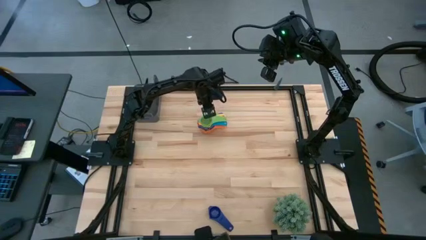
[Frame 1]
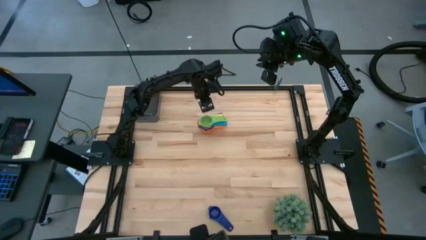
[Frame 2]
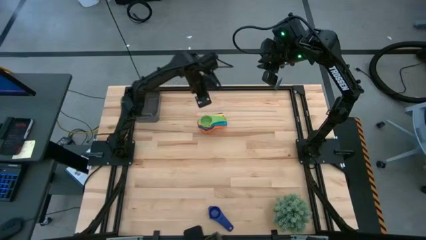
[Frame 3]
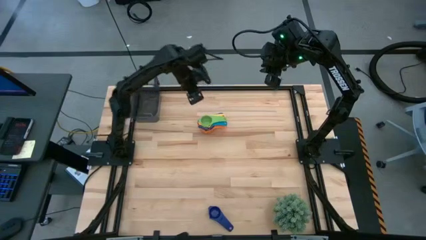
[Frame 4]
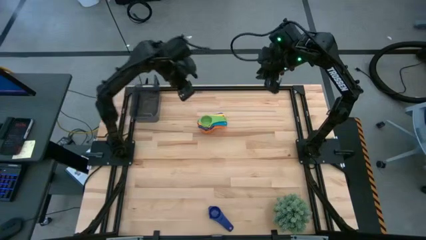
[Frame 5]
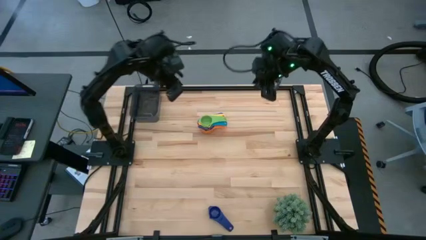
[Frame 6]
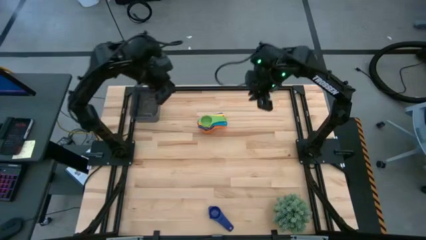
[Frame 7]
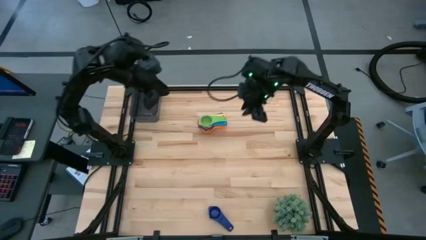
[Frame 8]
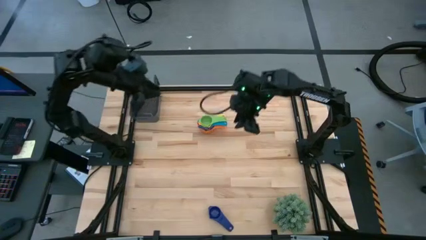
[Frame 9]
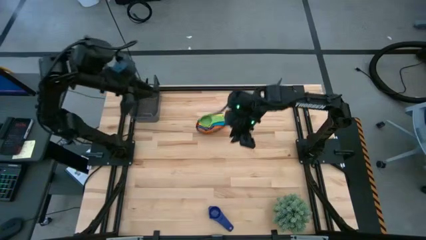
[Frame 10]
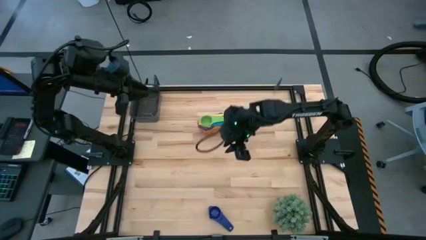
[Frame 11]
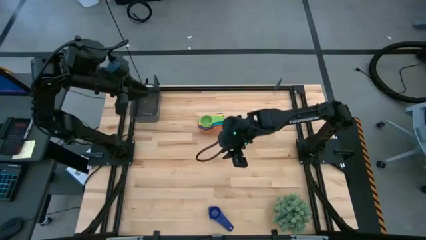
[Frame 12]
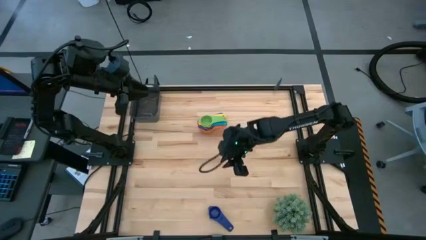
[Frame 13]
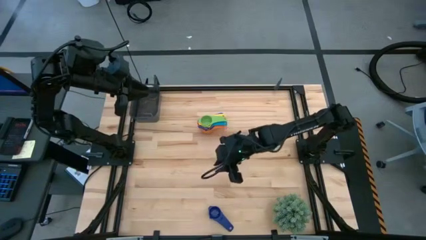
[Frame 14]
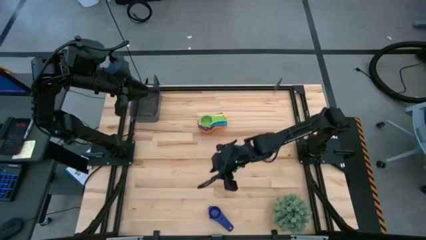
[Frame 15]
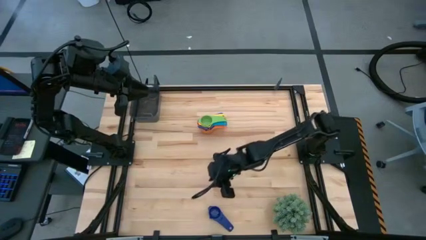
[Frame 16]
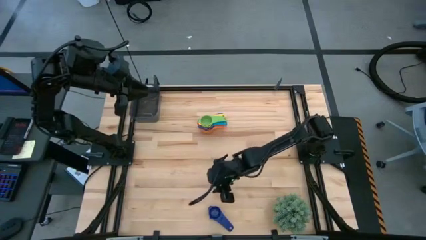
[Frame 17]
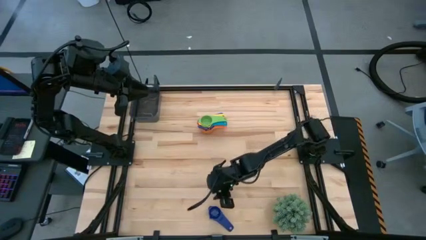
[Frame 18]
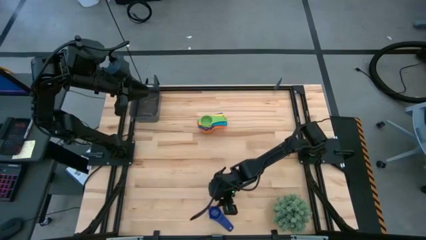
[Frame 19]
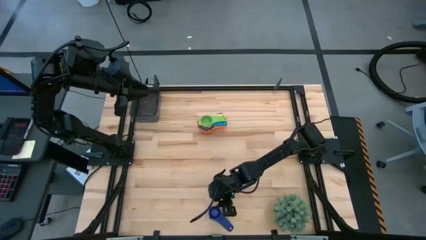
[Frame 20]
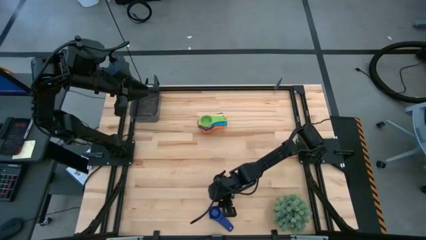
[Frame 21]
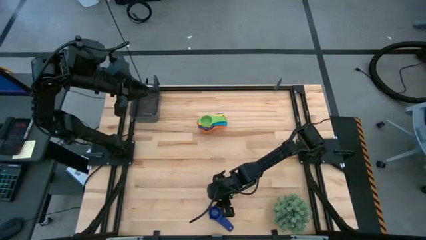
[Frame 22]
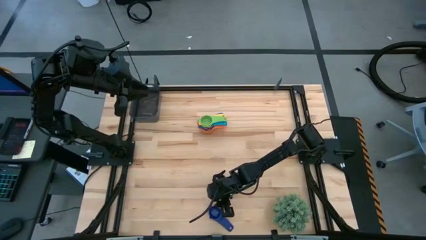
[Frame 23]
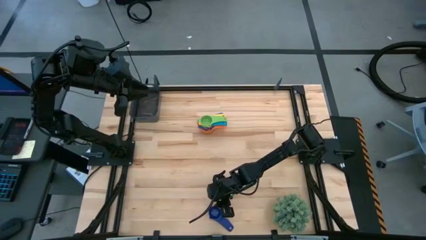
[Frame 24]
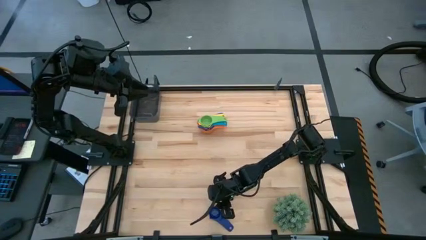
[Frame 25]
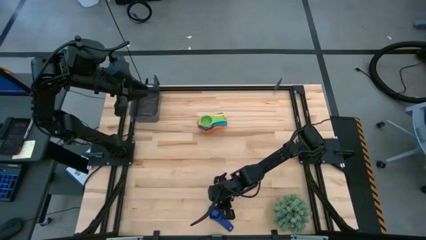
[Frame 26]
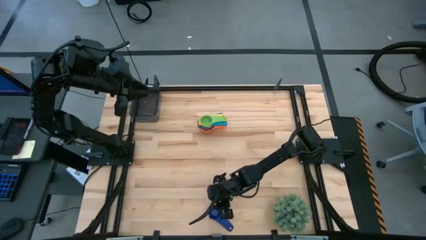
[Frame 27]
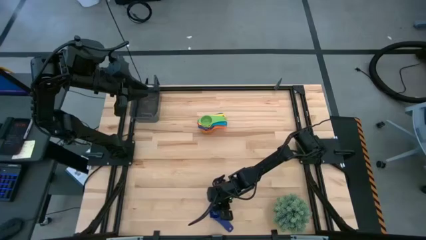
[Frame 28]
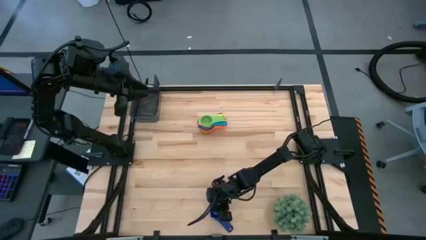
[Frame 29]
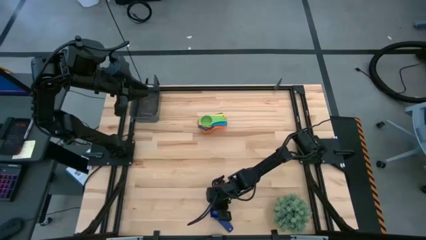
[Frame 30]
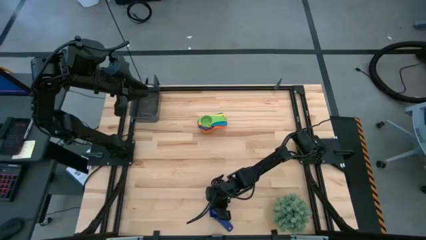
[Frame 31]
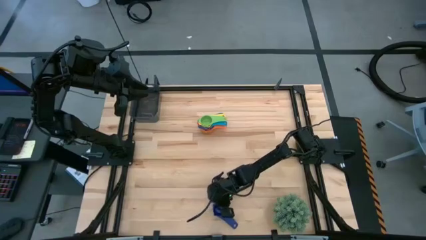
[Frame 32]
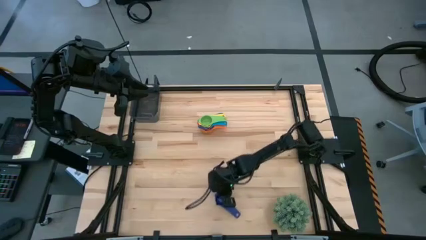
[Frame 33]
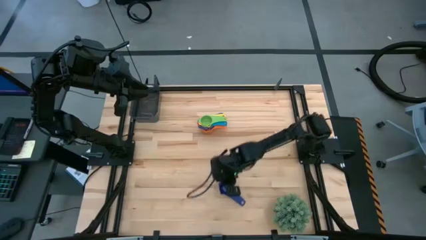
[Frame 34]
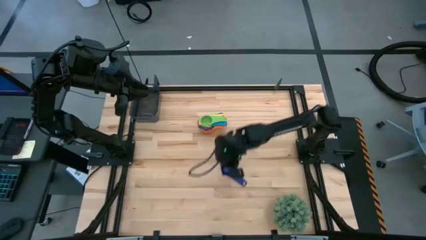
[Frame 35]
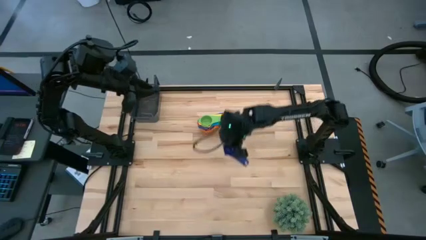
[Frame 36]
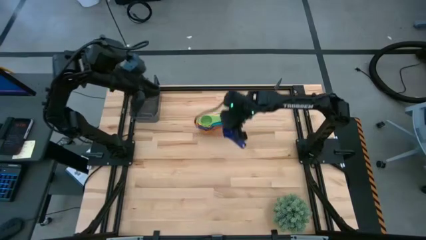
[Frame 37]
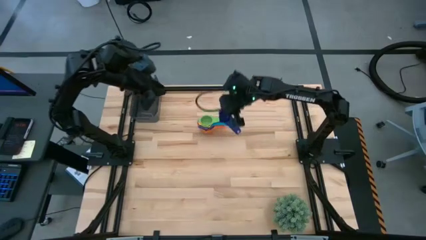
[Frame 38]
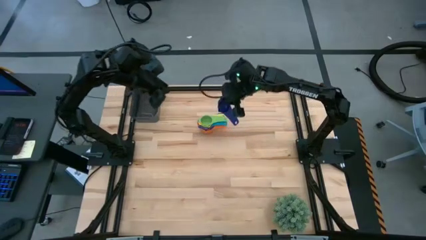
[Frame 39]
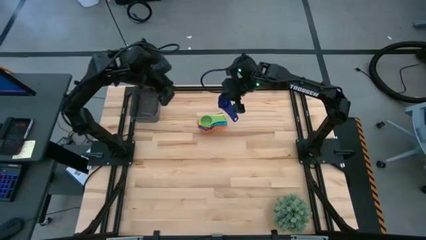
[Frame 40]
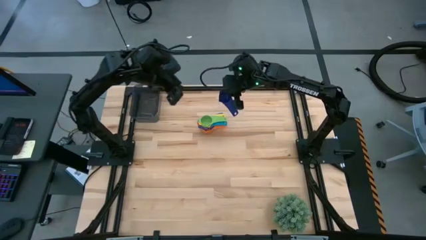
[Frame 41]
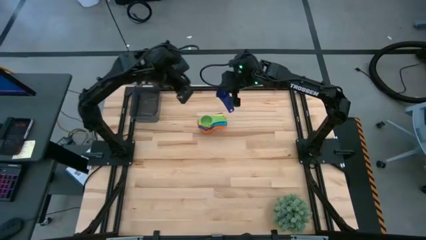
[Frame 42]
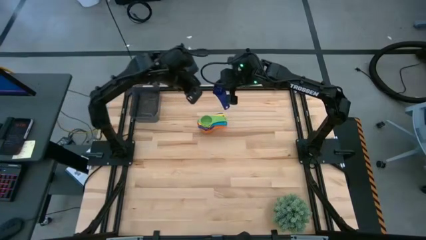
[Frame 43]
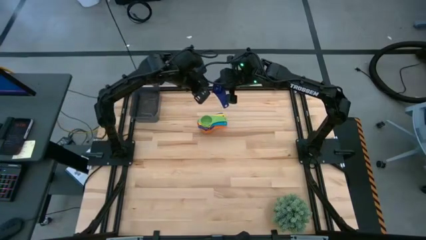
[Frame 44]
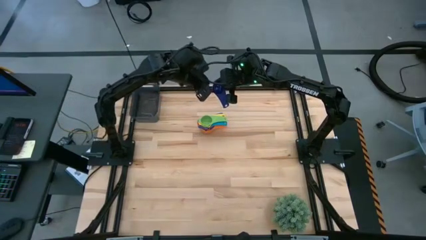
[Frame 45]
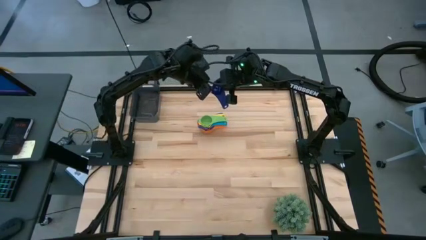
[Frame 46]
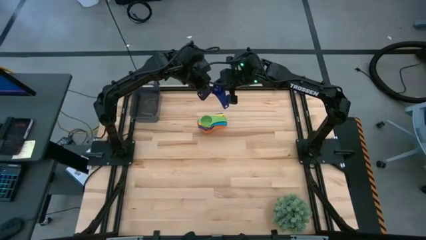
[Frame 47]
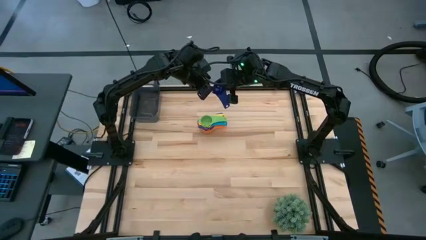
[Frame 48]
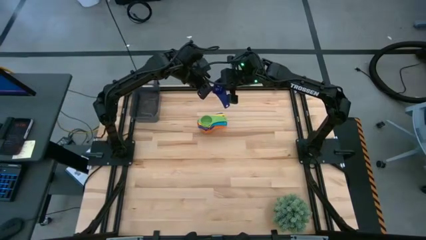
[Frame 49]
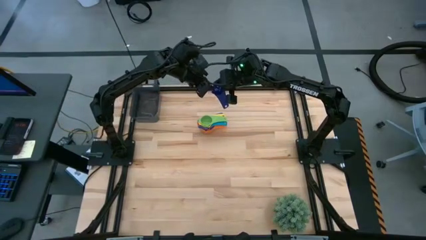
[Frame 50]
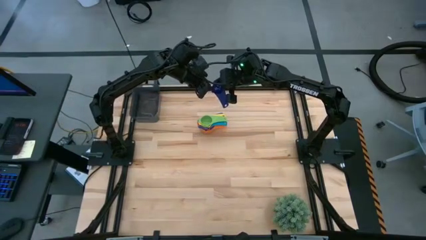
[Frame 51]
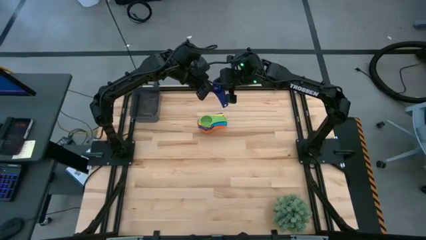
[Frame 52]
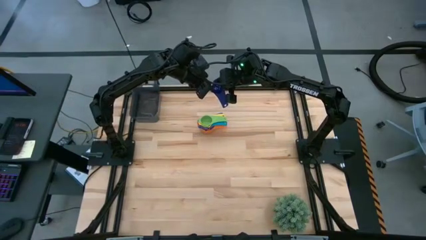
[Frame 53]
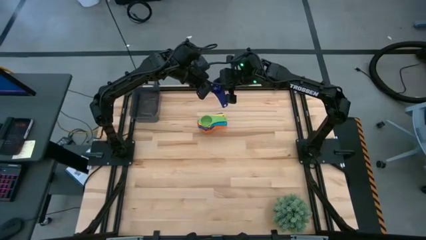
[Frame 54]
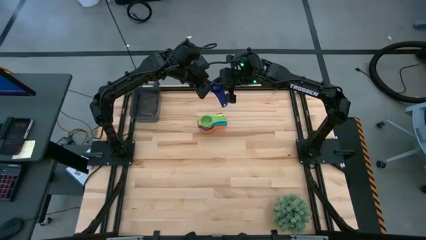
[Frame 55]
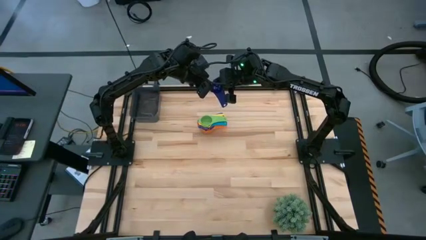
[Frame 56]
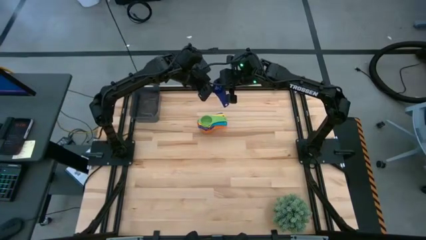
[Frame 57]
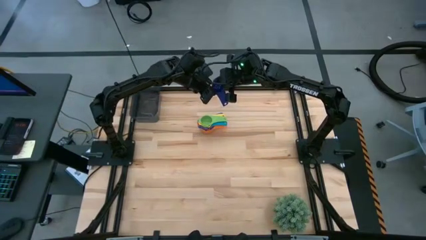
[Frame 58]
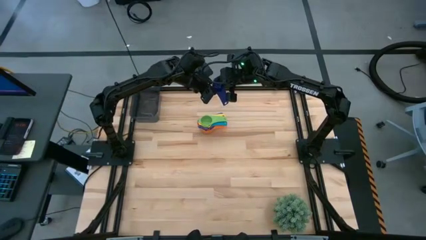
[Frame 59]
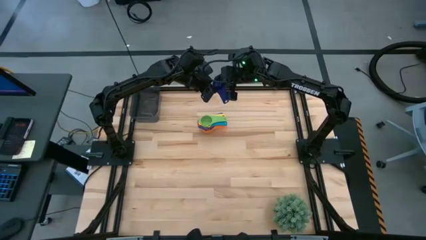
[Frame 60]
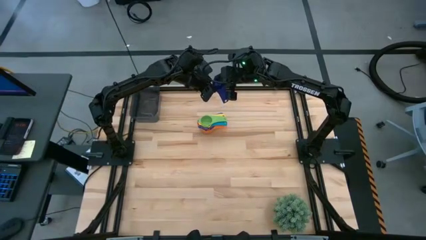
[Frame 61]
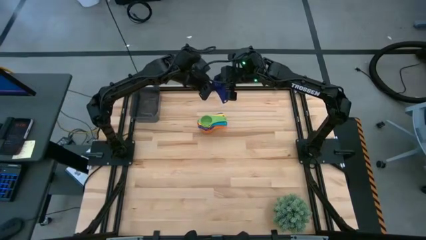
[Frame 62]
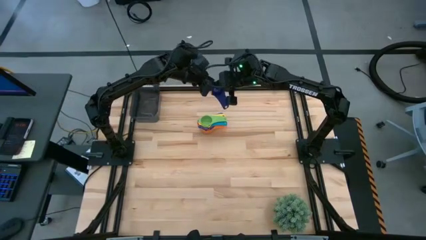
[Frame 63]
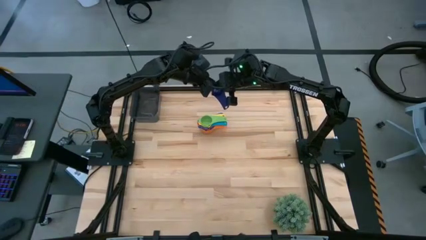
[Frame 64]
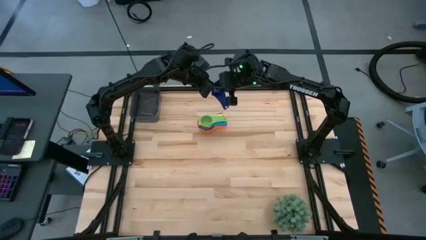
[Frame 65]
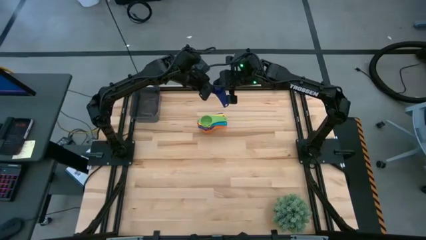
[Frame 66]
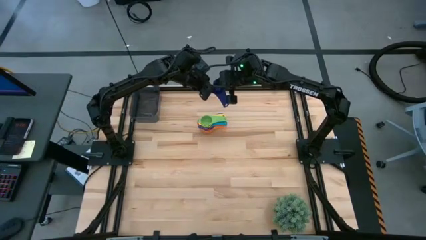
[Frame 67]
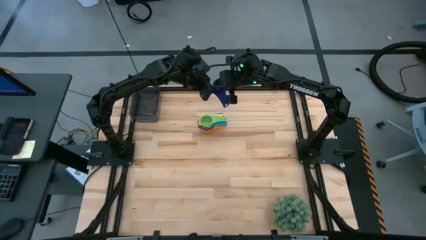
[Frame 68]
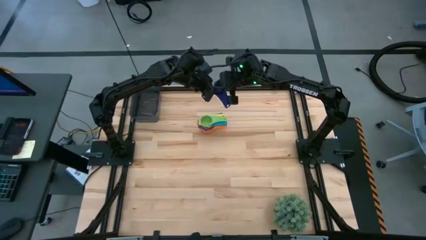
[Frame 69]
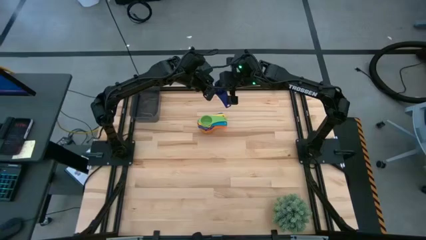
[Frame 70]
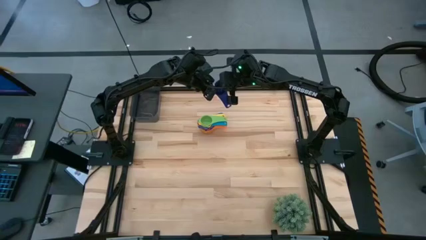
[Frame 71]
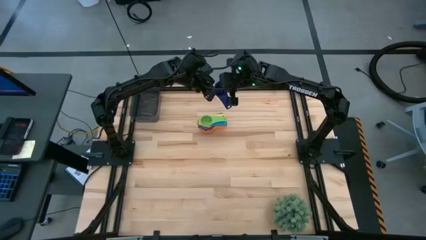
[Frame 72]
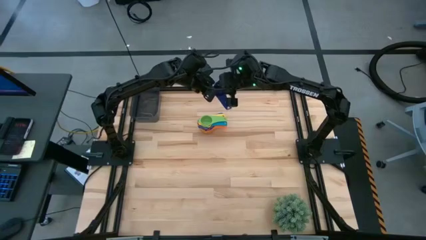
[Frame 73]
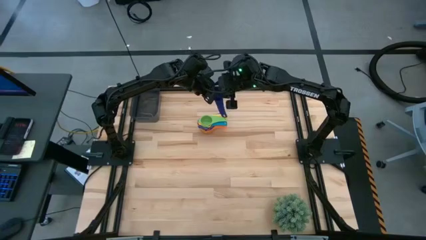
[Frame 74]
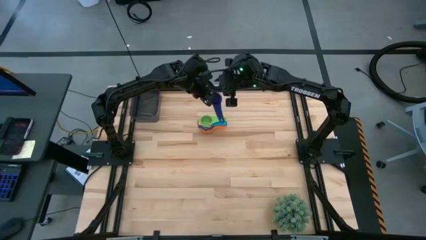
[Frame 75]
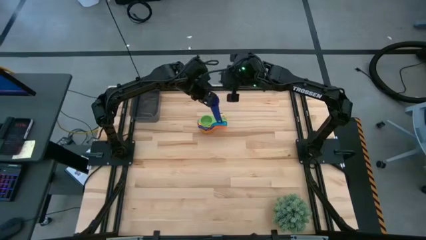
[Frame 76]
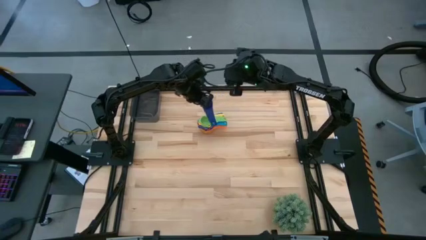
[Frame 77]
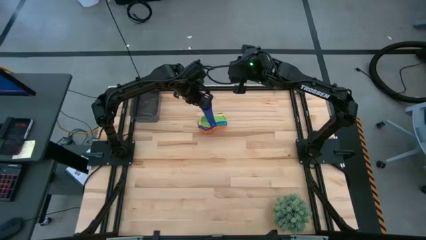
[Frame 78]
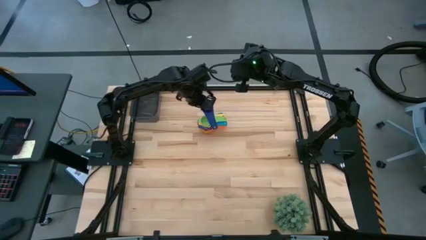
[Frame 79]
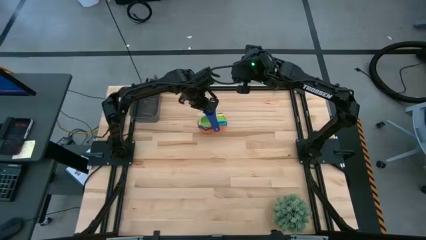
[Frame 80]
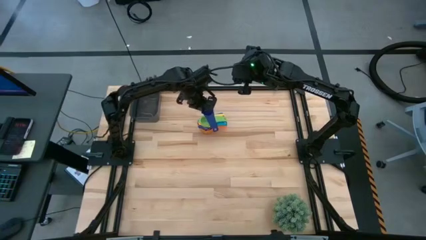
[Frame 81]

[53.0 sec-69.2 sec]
Task: Nest measuring cups in basket
Stack the violet measuring cup on top of the green measuring cup
